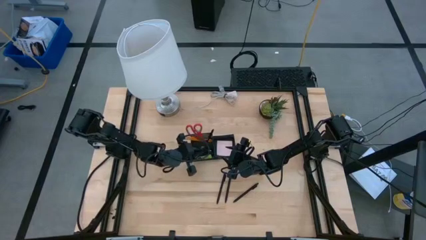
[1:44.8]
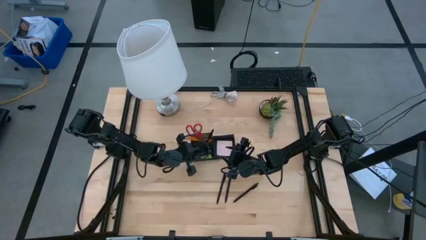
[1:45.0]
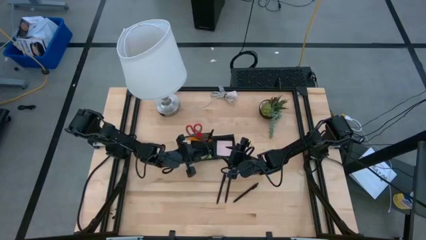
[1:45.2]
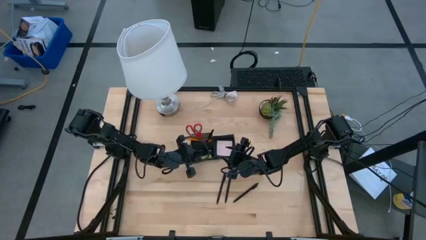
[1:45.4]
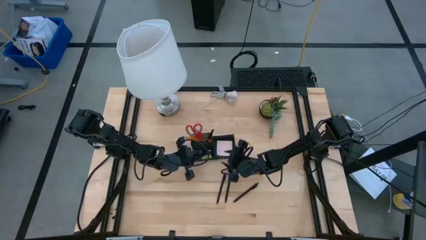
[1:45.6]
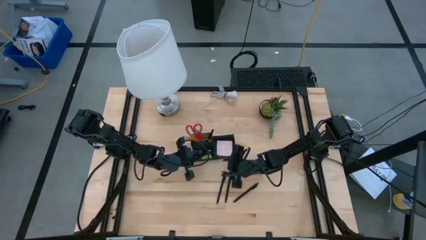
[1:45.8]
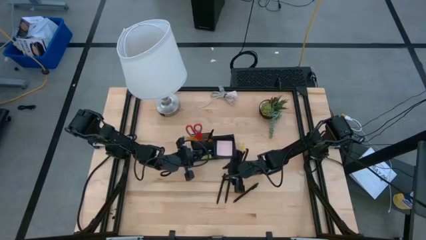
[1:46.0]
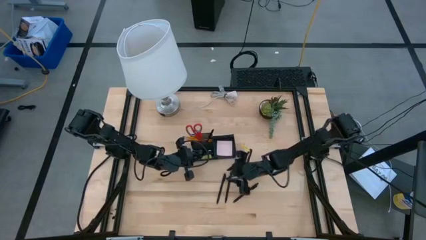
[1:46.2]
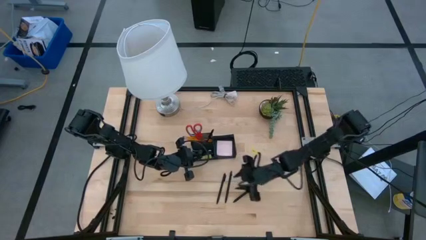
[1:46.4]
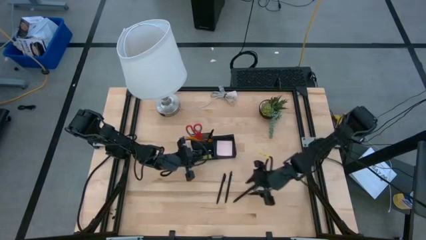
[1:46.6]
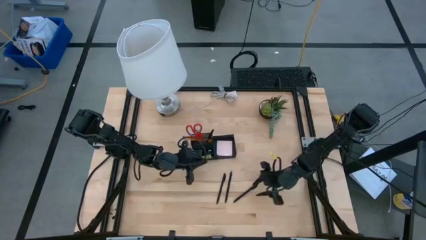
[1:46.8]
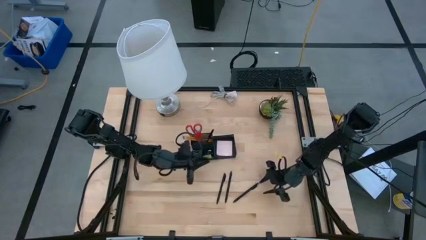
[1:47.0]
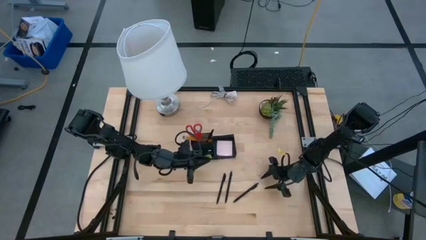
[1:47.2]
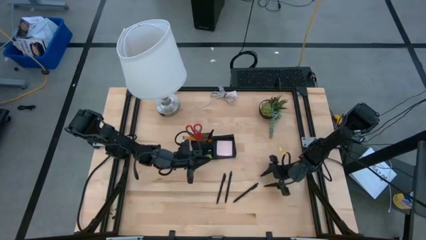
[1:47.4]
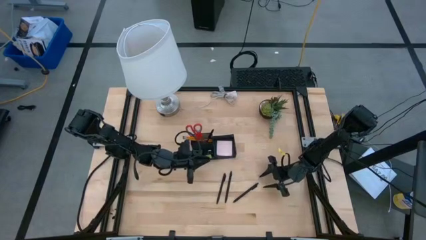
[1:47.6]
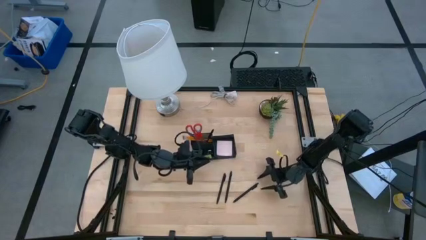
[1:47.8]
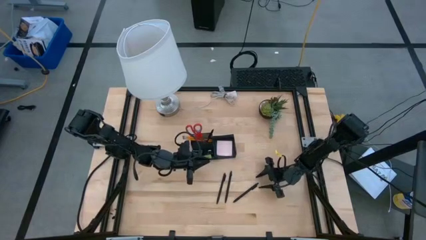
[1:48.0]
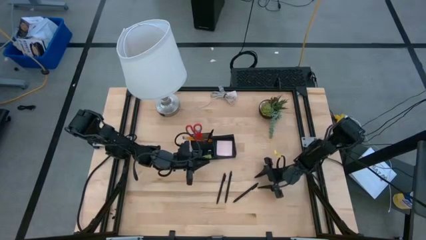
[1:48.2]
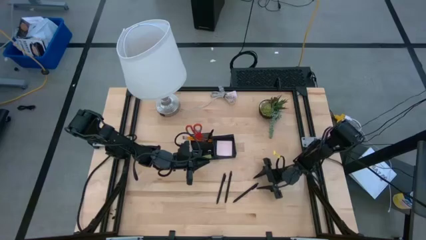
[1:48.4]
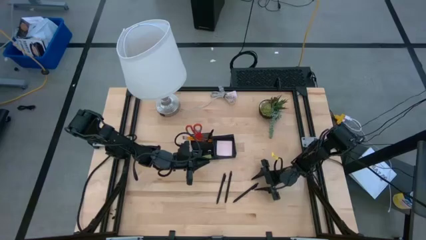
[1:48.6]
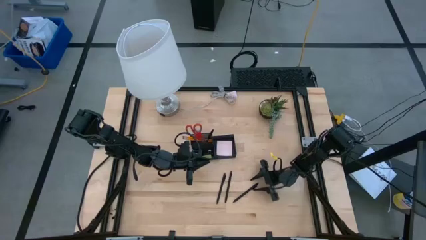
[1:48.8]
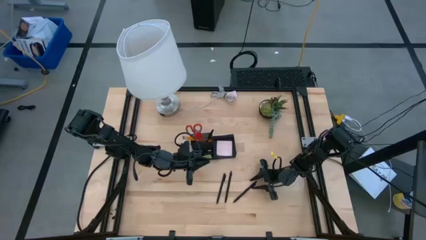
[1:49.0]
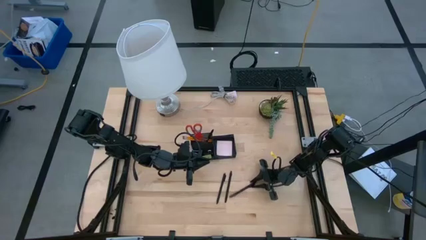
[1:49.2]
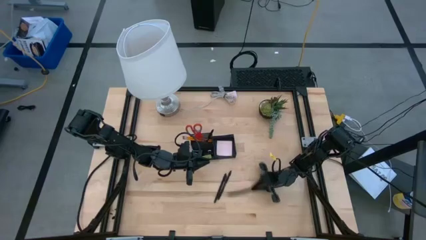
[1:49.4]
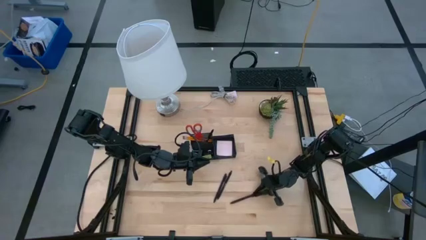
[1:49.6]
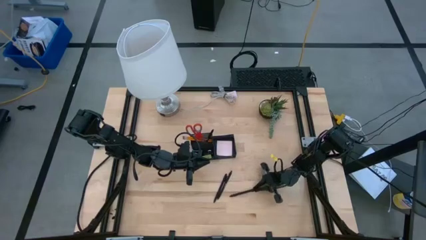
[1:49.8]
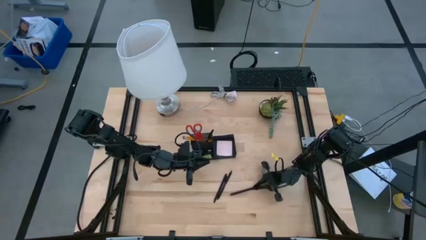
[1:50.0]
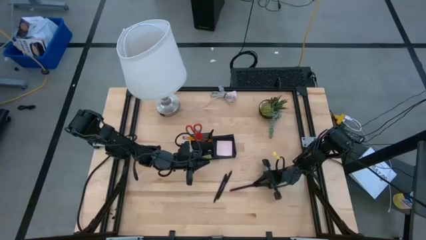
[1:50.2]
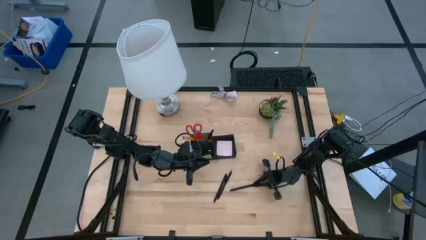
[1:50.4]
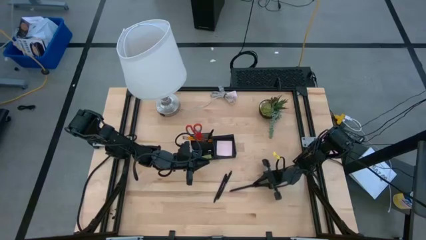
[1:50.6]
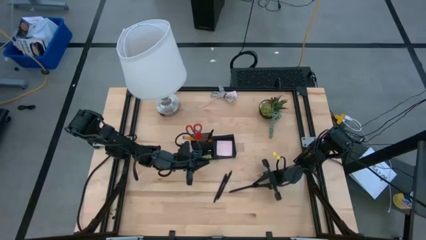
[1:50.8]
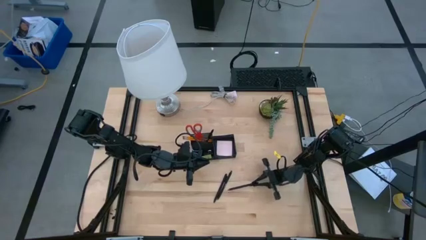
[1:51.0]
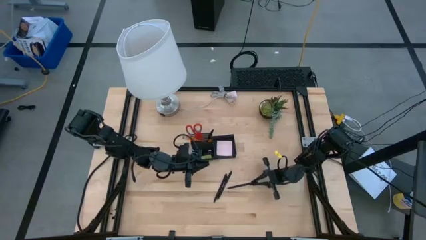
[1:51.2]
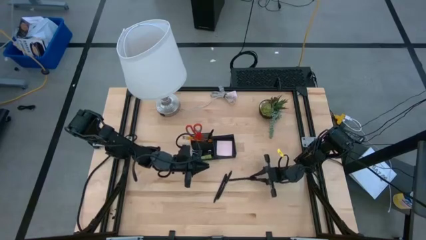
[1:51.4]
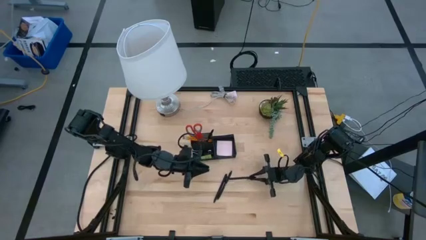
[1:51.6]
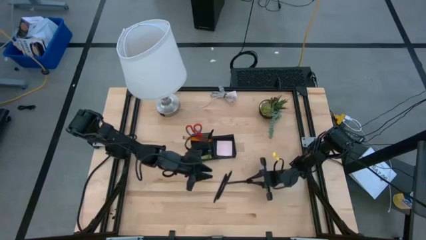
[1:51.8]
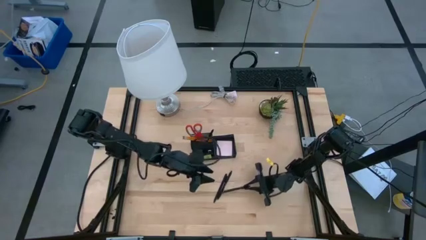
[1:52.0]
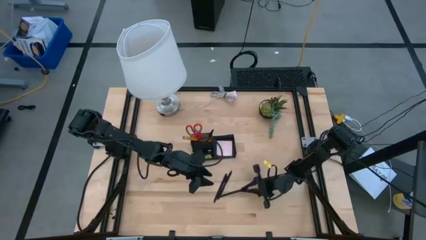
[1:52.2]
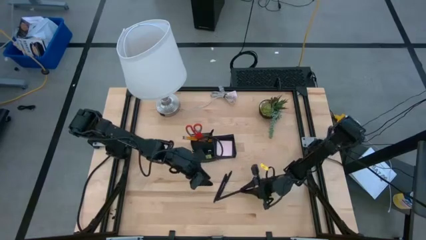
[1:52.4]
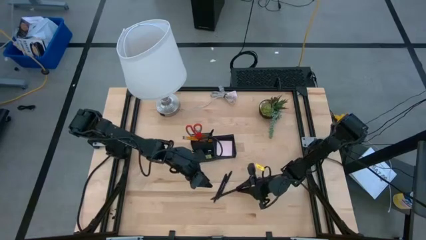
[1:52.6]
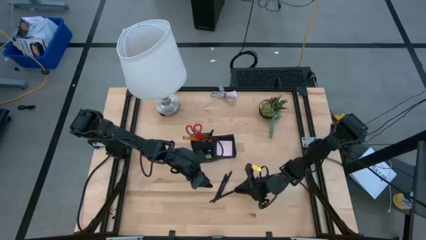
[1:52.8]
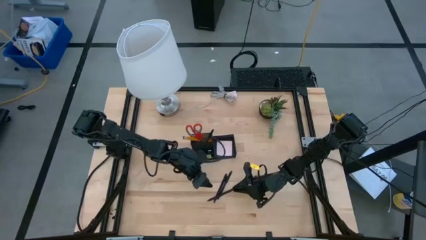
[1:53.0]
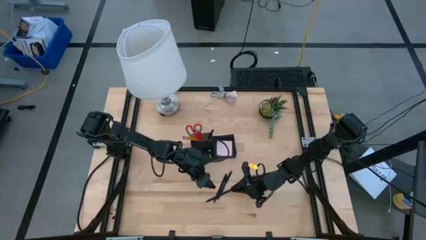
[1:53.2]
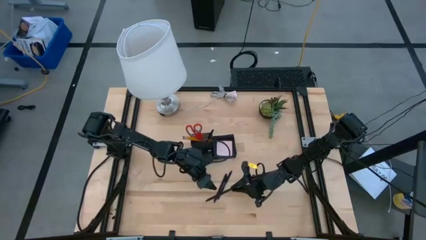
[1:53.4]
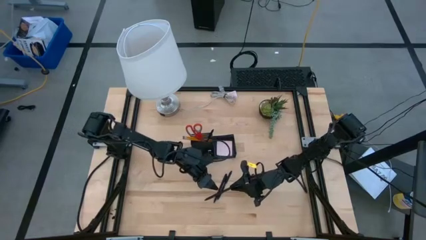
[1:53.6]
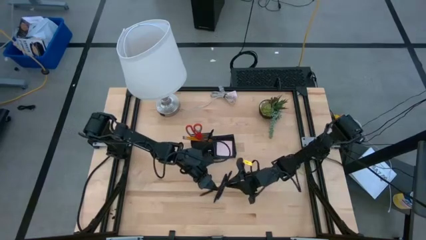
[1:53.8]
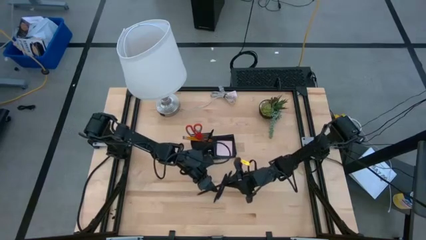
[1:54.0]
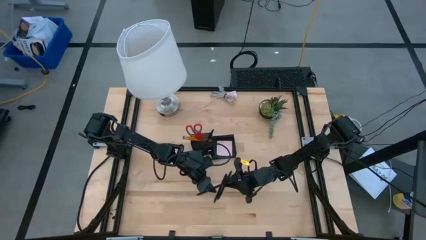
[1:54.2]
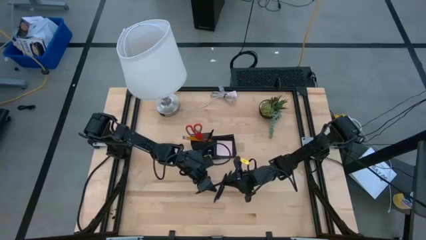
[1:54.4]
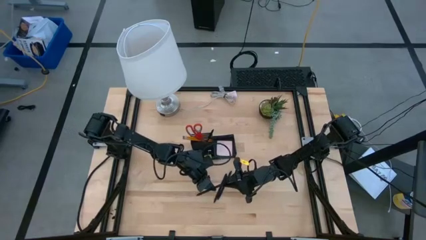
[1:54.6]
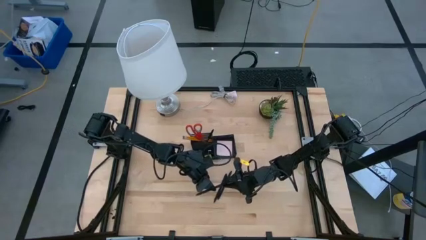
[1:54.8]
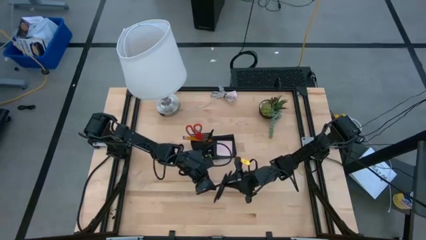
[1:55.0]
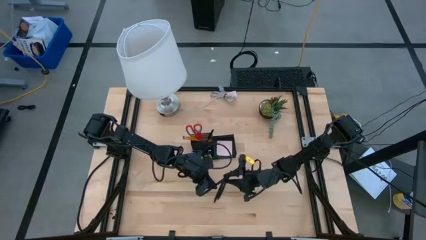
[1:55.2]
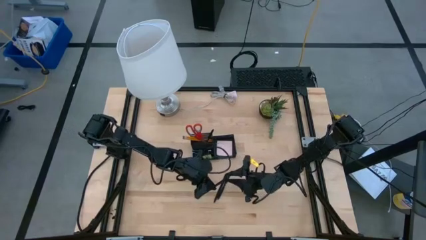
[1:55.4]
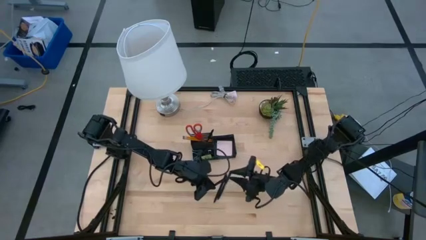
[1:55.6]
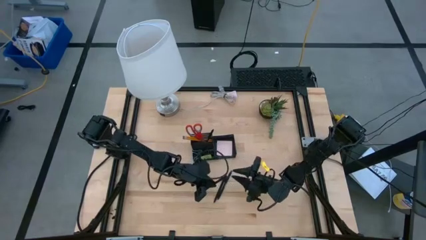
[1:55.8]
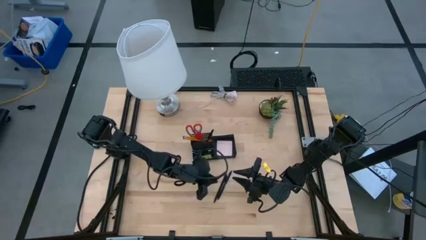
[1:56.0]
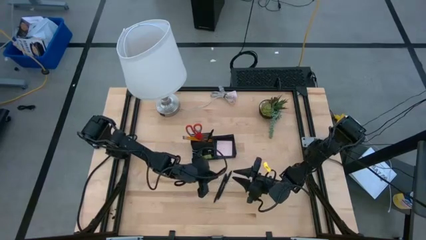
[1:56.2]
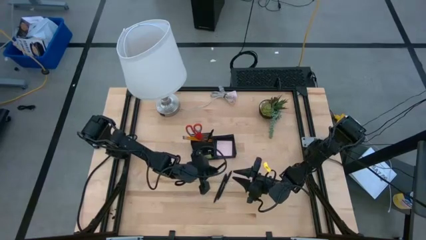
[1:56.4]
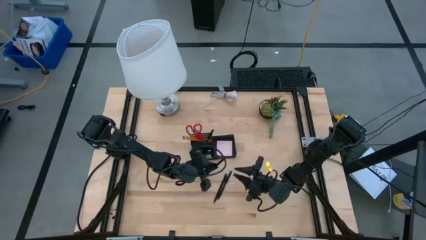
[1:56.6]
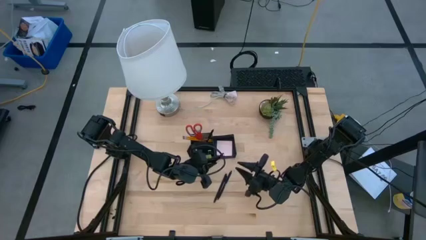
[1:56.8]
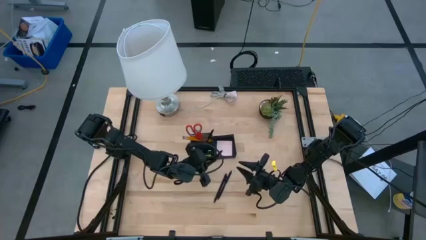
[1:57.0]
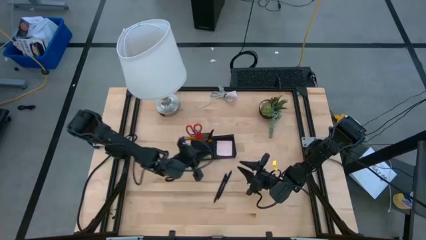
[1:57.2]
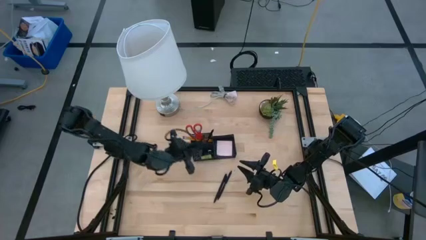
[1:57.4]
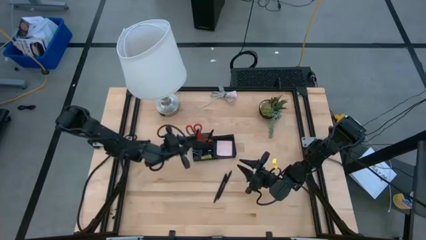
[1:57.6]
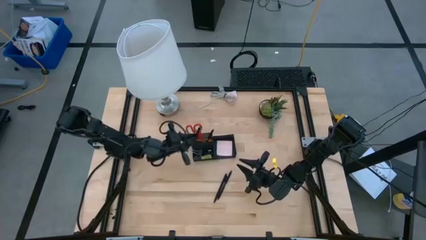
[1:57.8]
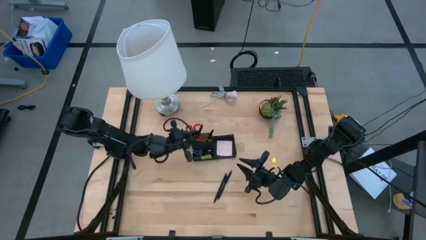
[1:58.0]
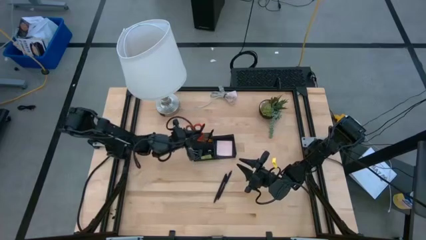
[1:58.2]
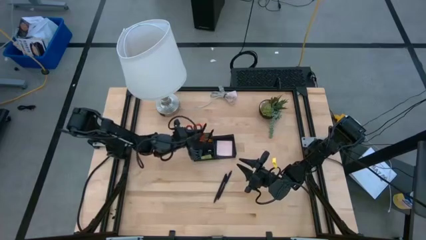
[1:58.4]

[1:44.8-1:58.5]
Task: Pick and place office supplies into organizer
Put the black pen into the black desk organizer
